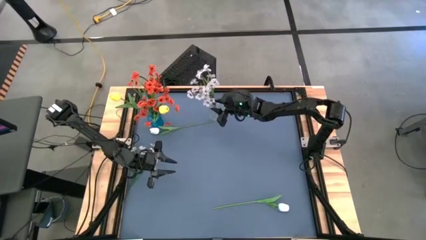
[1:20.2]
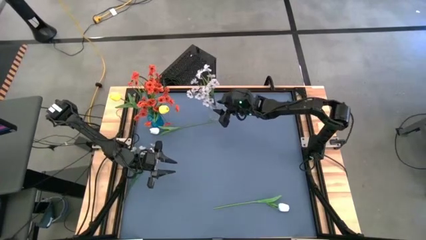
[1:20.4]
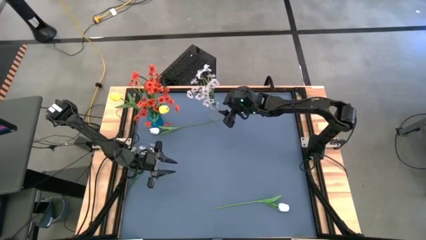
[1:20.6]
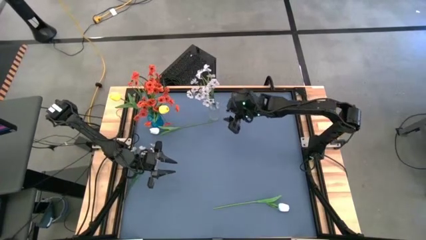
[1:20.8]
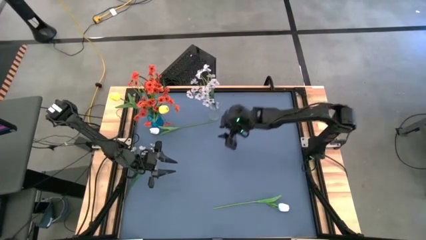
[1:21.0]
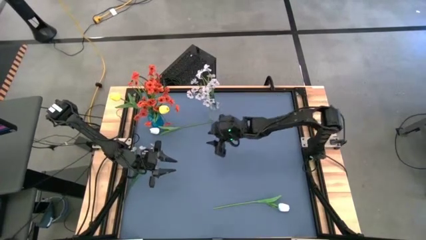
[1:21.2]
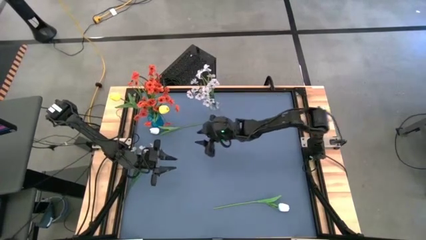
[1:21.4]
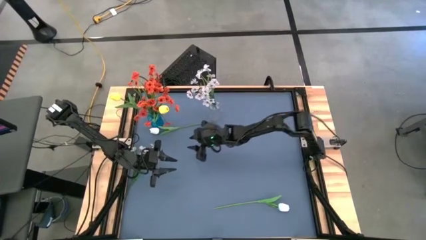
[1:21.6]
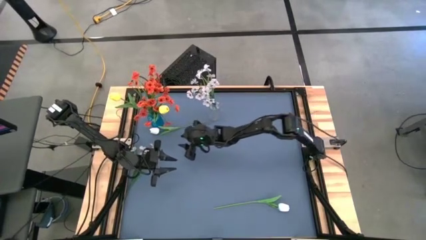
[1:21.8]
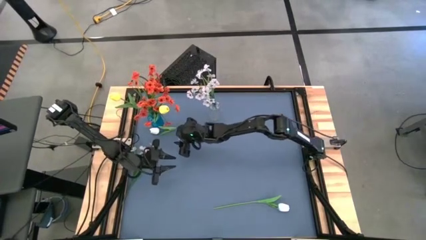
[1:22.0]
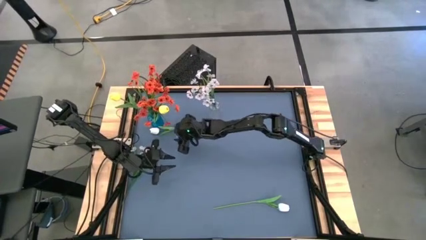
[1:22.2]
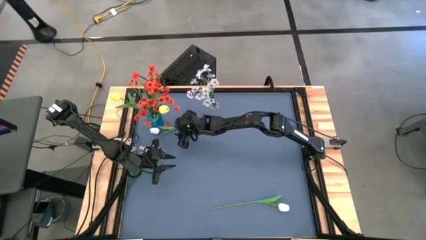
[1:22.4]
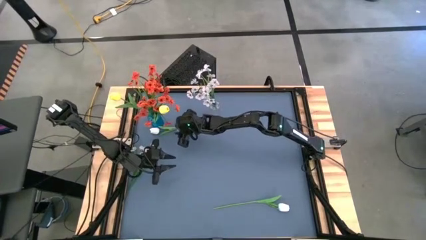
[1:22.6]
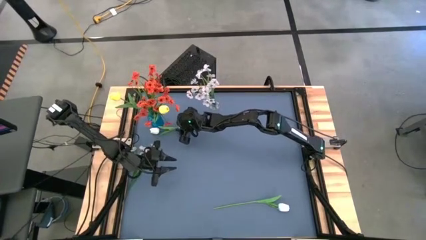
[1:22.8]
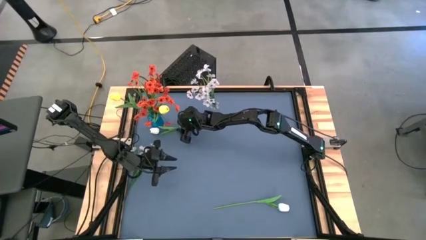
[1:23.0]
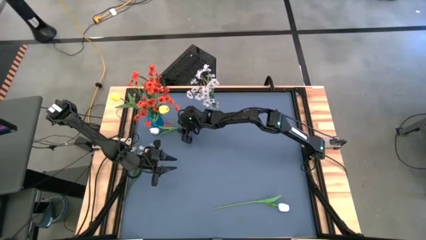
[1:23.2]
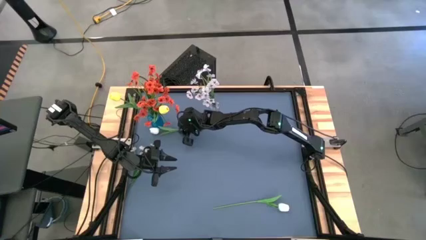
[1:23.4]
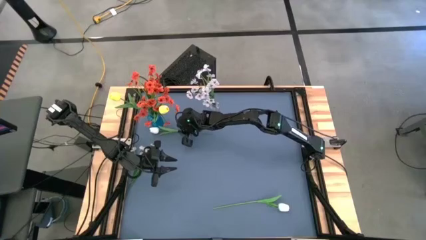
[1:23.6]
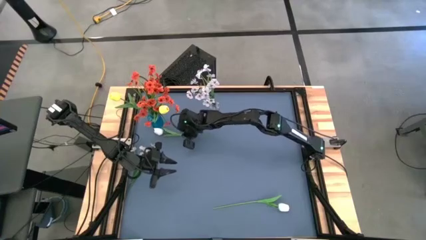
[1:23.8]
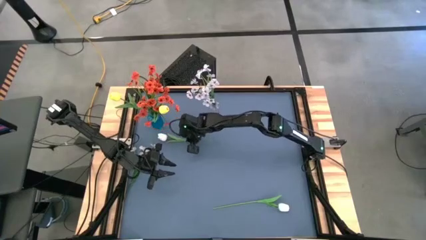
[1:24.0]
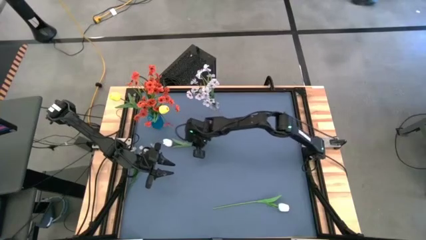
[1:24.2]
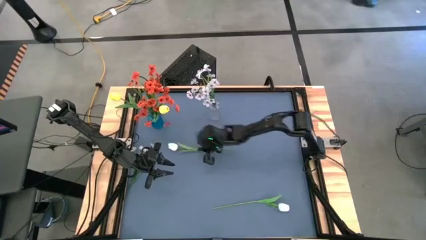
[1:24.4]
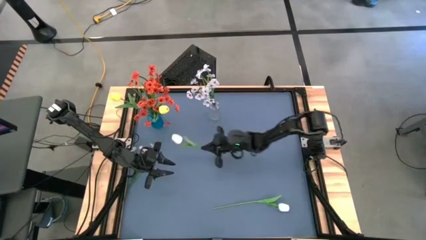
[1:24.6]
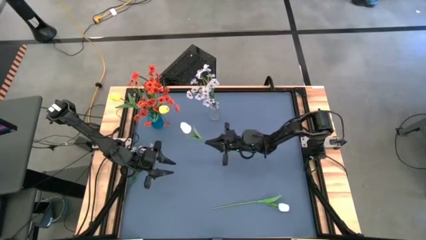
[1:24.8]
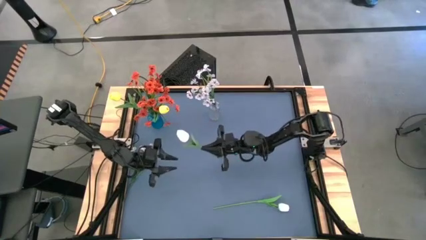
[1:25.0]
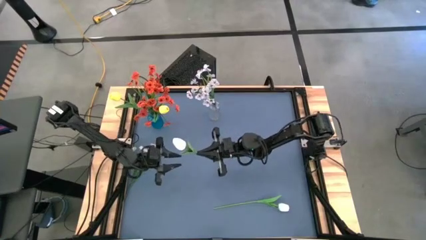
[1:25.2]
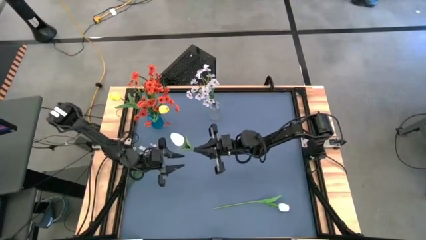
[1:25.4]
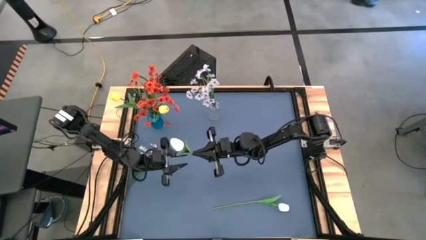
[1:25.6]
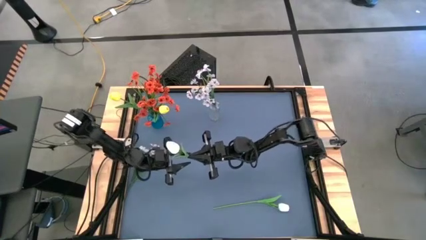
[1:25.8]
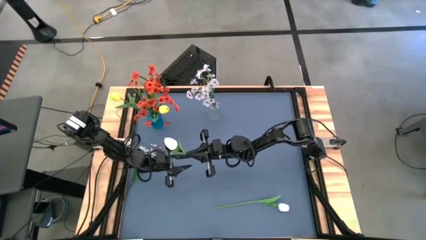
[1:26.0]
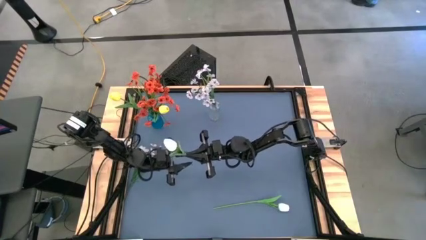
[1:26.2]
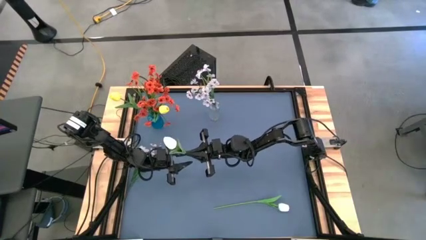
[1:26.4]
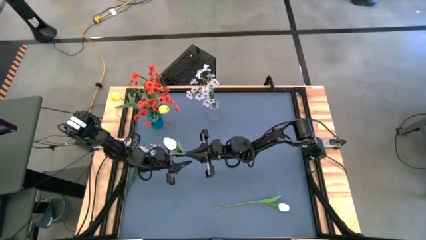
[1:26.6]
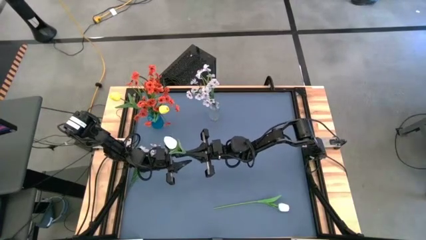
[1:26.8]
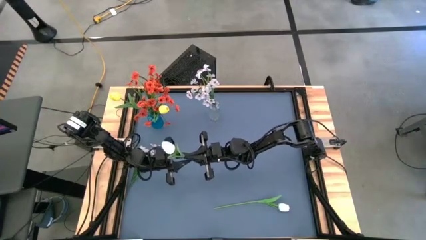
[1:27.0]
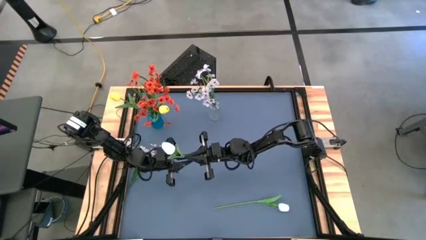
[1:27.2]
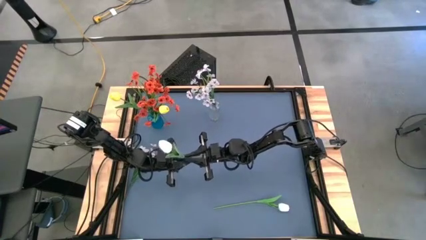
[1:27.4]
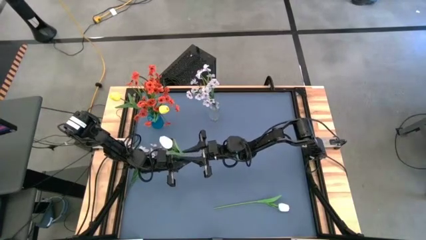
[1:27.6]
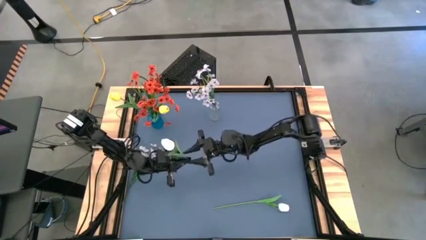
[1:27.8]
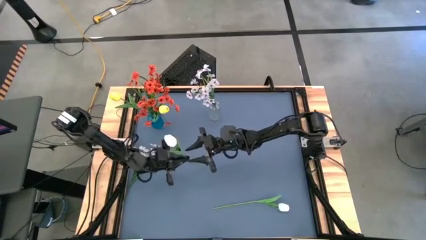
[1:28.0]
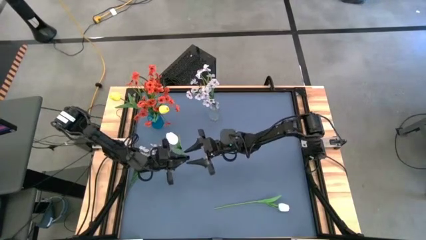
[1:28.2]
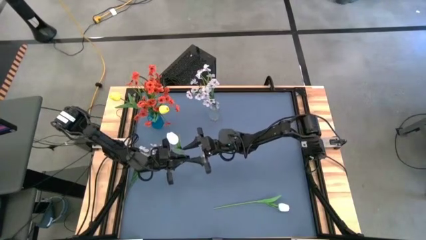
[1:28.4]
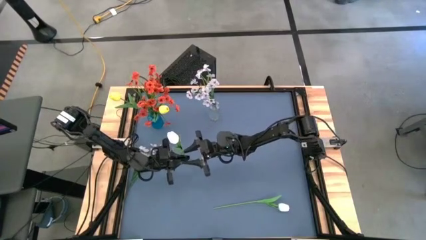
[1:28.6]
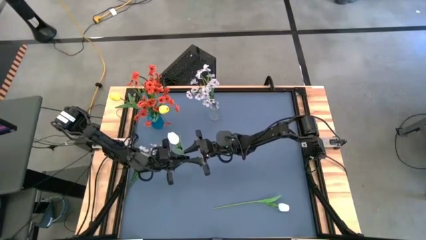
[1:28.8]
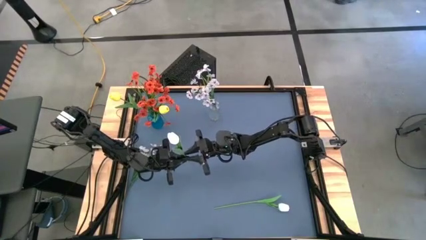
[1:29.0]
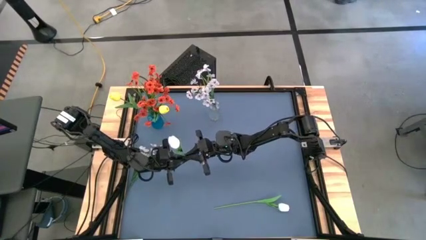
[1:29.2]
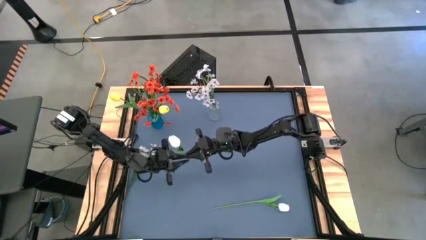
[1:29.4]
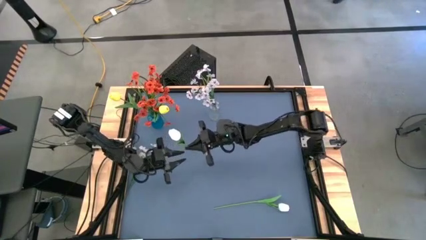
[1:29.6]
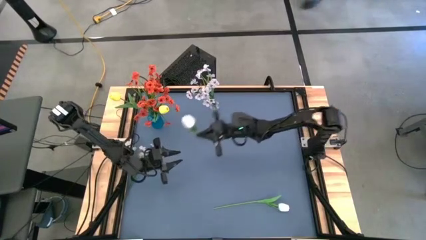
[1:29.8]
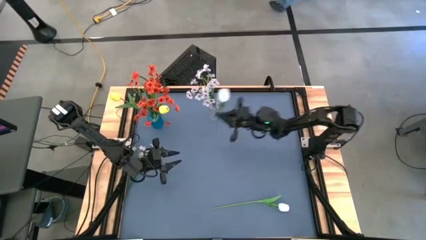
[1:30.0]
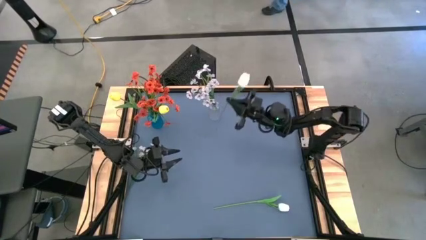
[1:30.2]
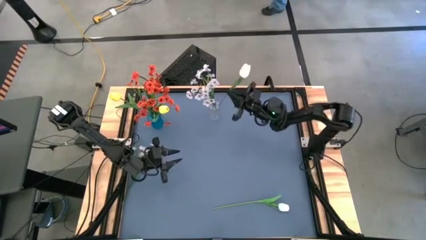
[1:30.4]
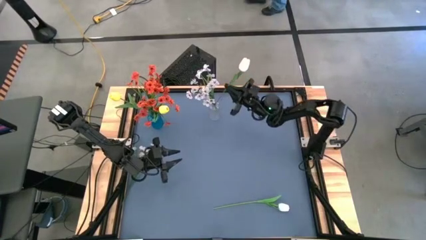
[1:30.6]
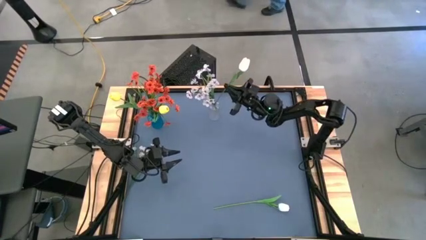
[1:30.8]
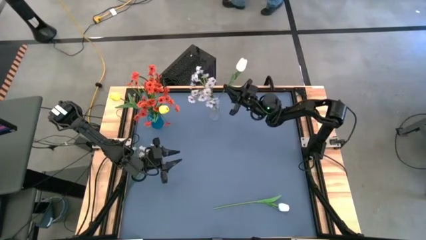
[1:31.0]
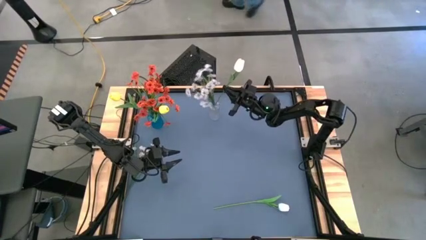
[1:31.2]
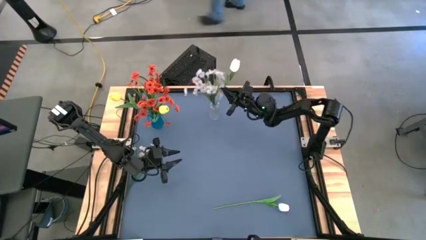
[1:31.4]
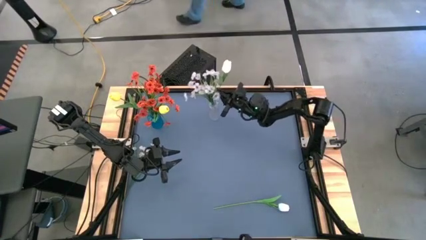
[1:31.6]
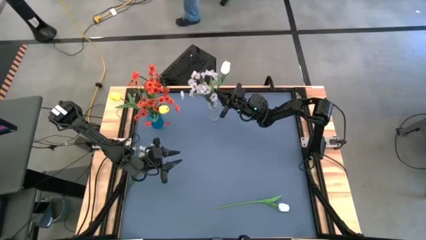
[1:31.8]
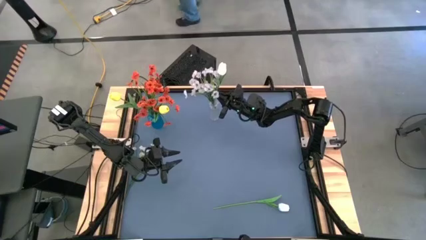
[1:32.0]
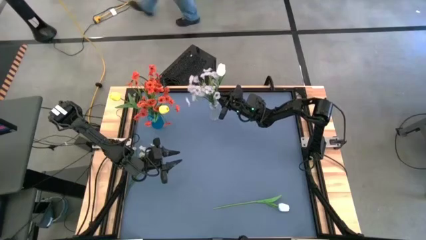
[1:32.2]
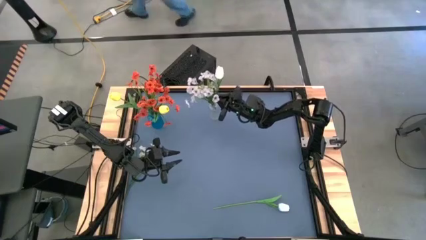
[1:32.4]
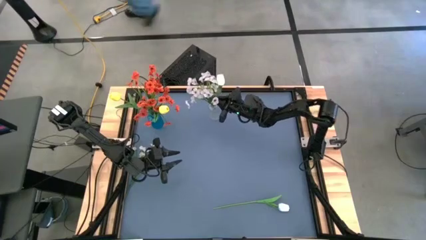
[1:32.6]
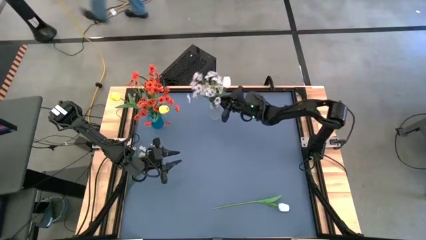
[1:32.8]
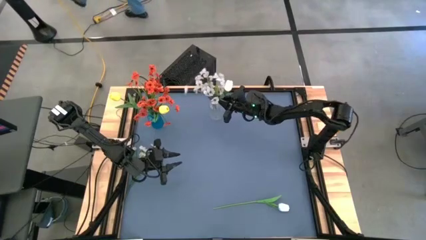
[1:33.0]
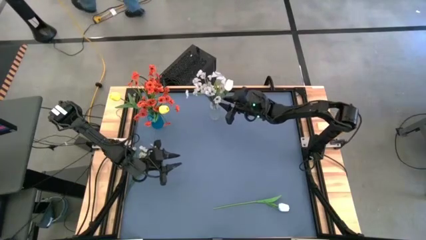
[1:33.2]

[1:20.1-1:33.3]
Task: Sort flowers into vase by color
Put the top white tulip into the transparent vase

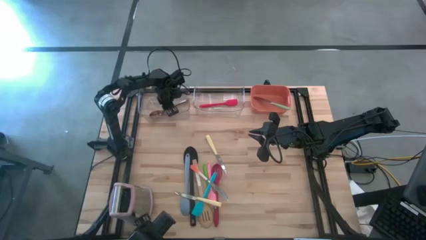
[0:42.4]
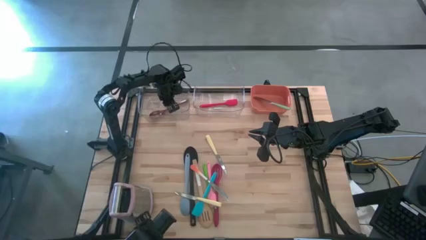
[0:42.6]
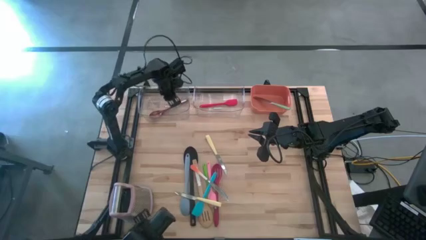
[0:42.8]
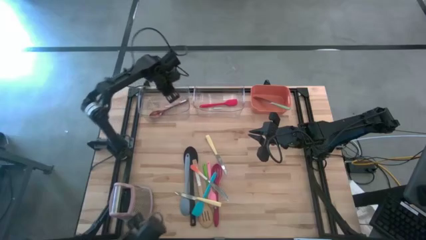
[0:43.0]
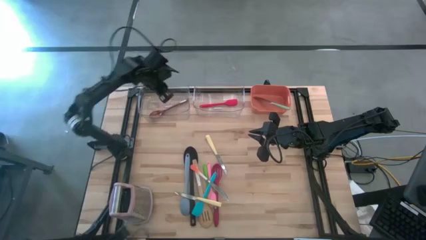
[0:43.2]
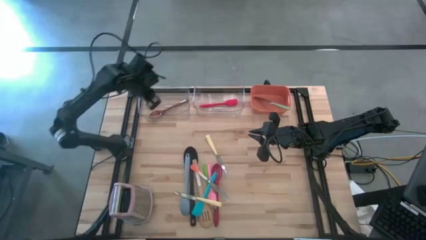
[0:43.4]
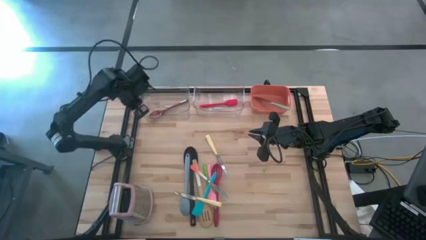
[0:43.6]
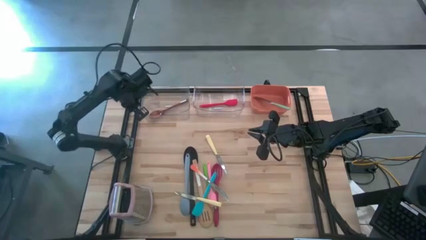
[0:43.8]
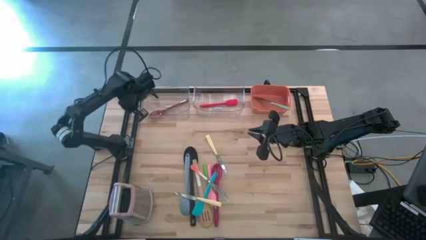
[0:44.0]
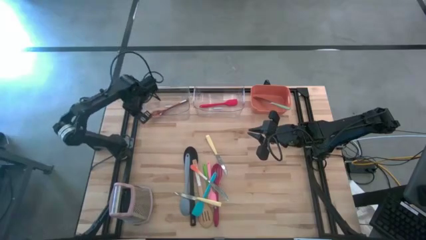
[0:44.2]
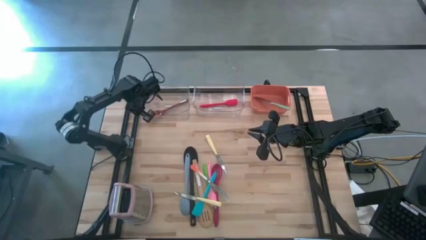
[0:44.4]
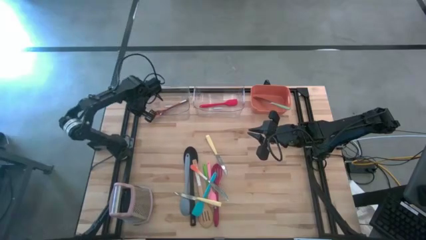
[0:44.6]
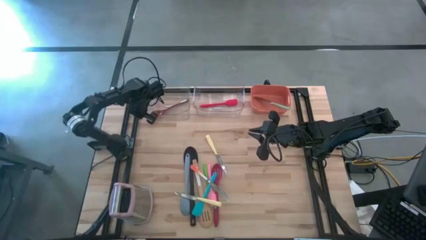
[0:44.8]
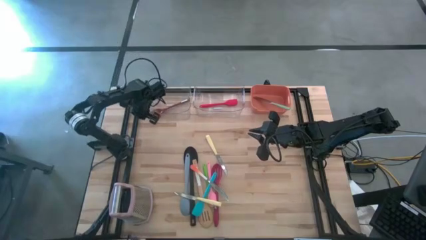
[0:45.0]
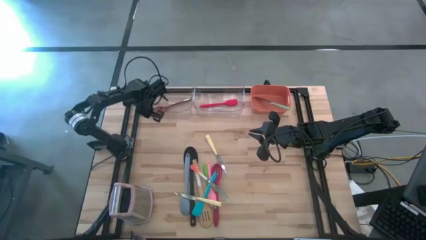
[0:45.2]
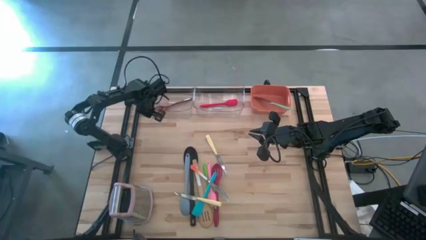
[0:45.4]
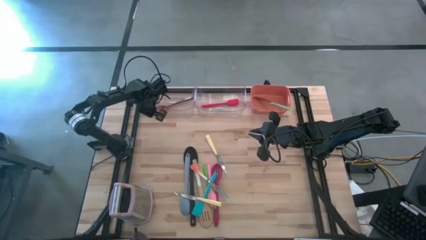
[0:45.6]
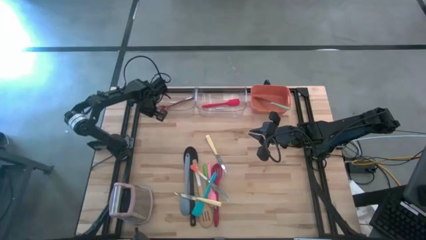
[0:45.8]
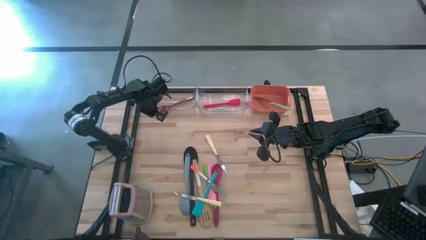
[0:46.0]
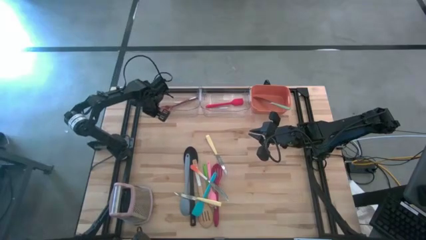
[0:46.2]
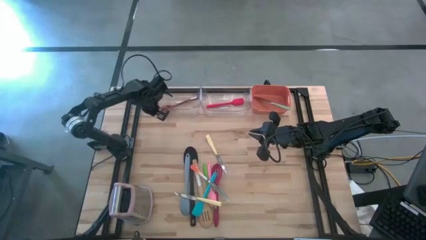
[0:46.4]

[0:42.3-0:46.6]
Task: Pick & Place Kitchen Items
Adjust the left transparent bin
